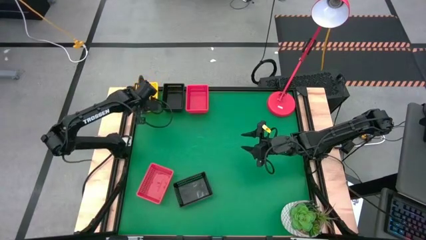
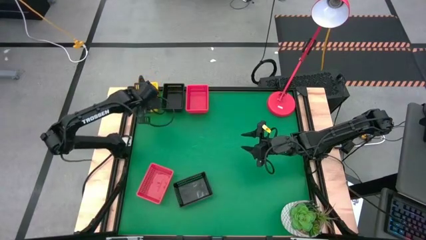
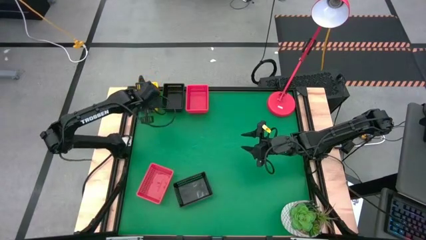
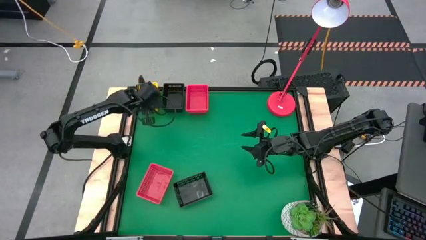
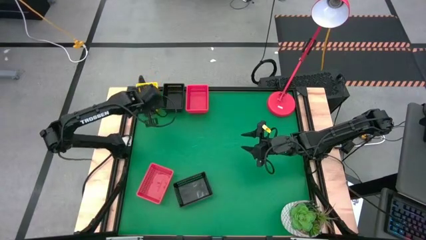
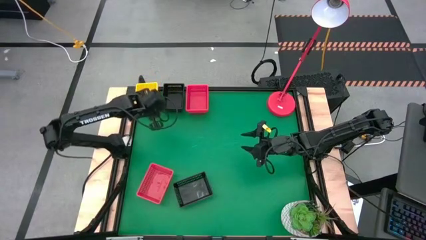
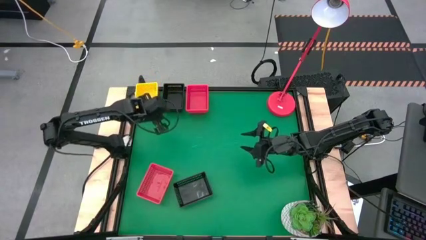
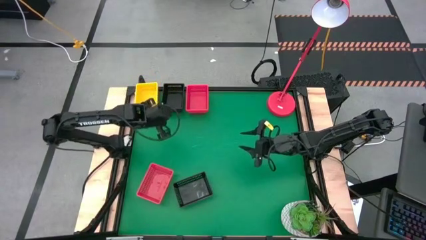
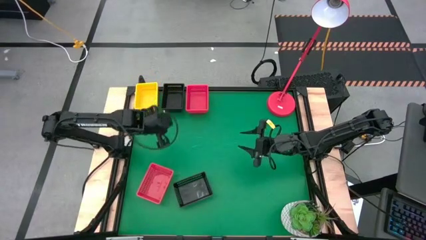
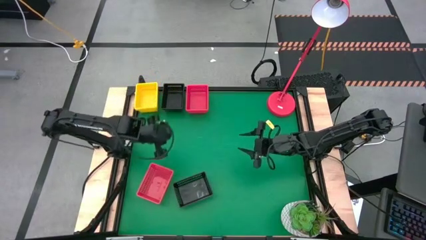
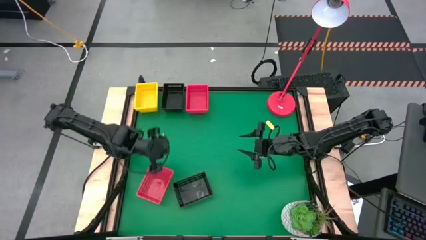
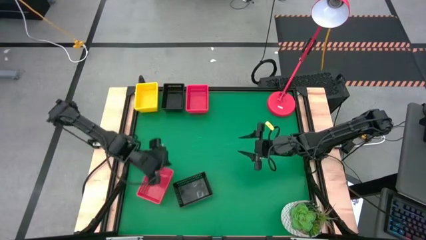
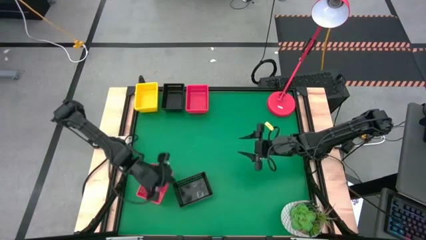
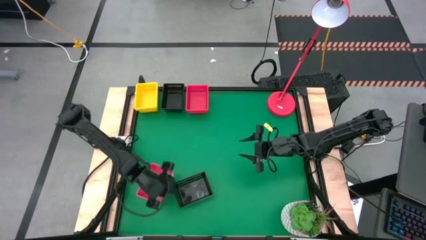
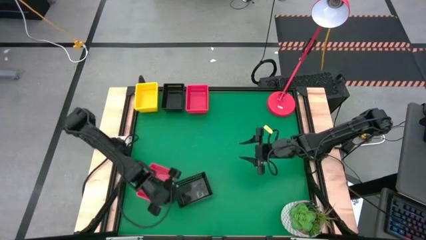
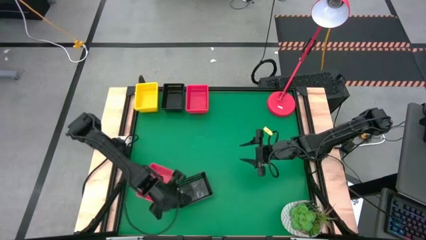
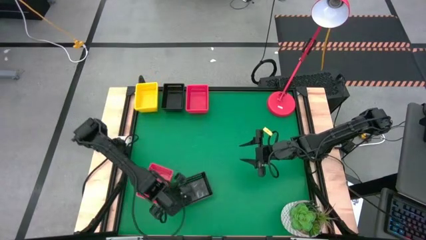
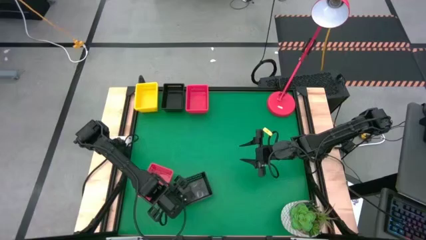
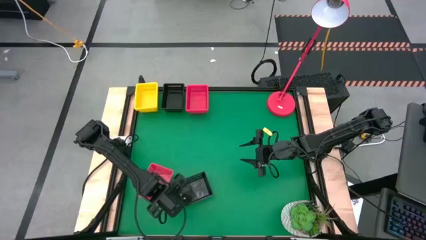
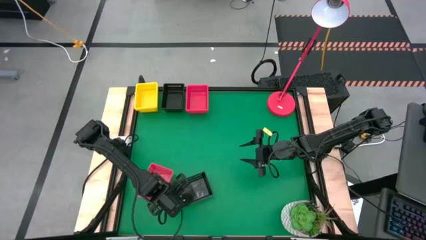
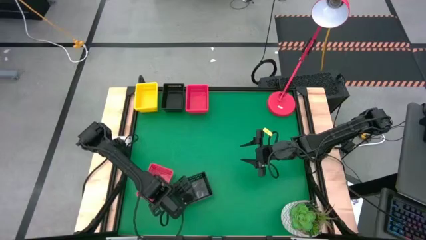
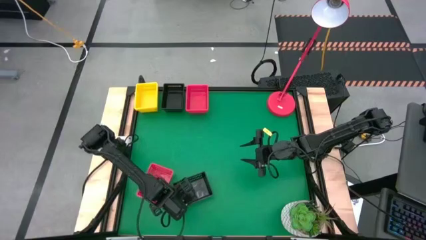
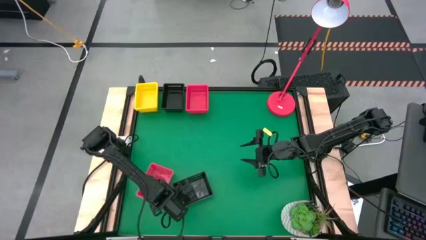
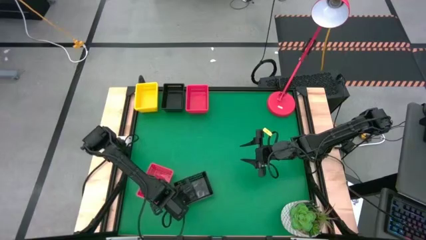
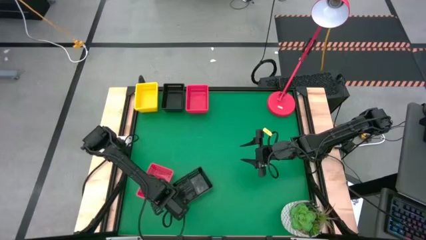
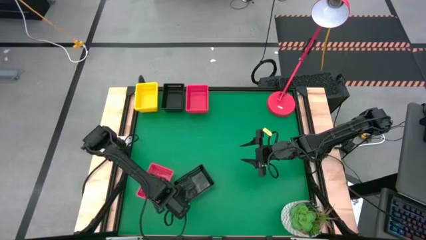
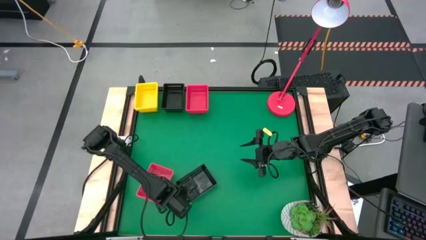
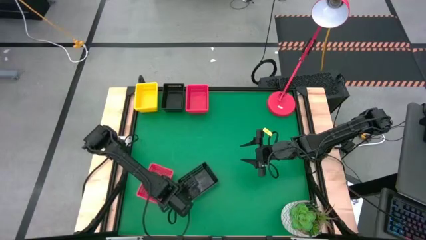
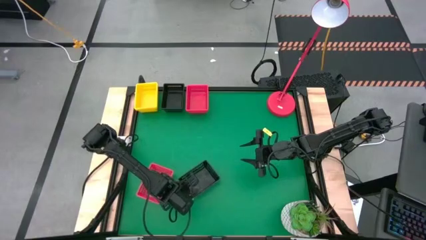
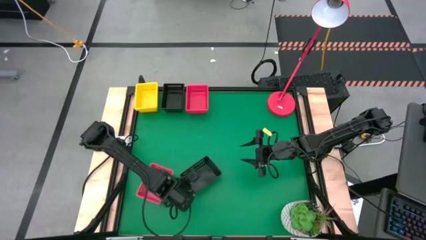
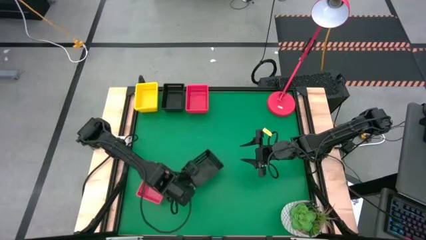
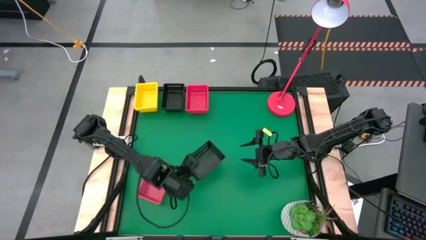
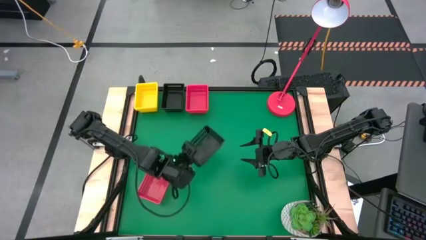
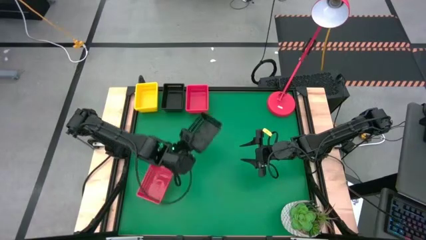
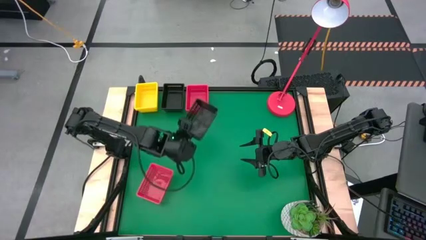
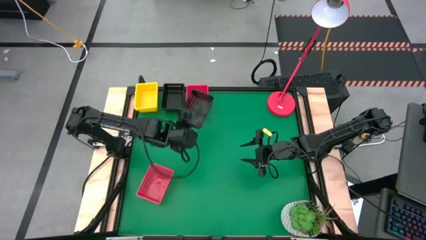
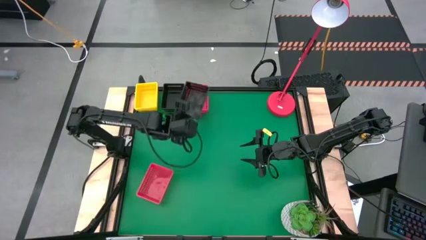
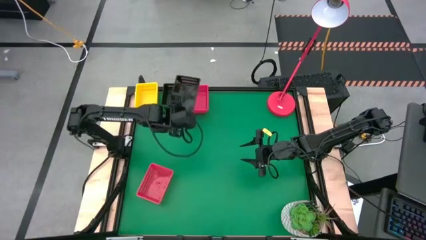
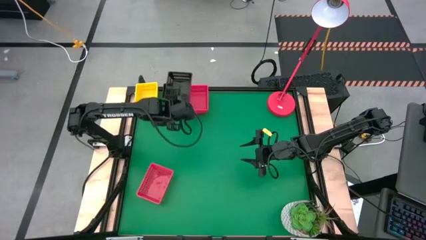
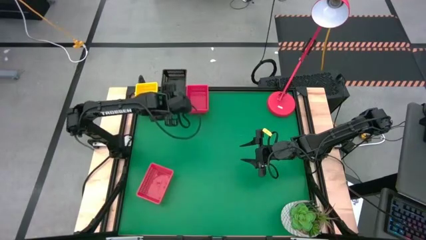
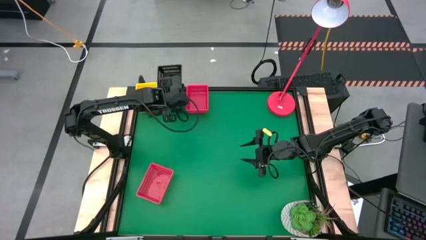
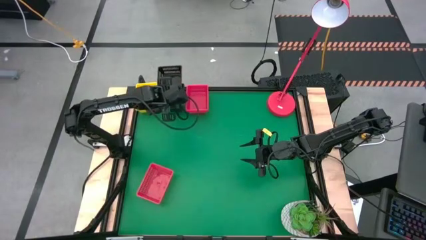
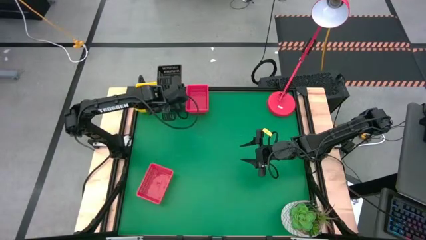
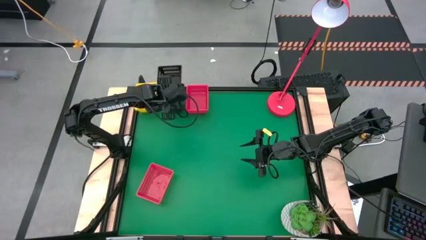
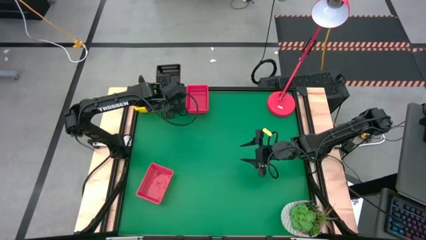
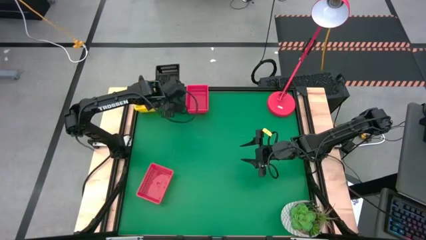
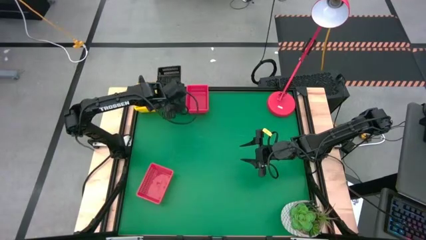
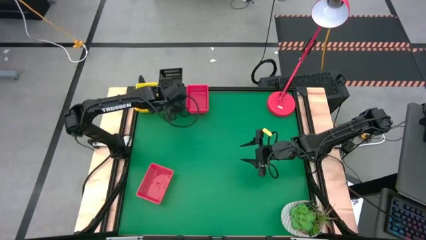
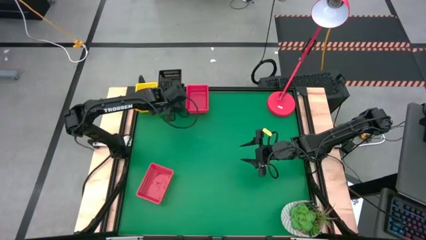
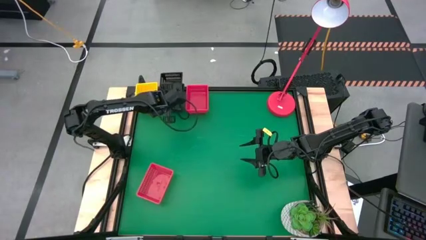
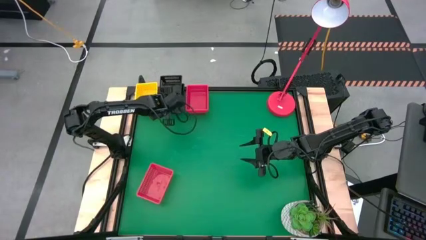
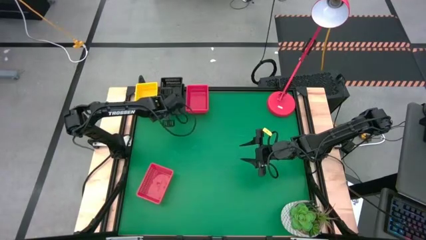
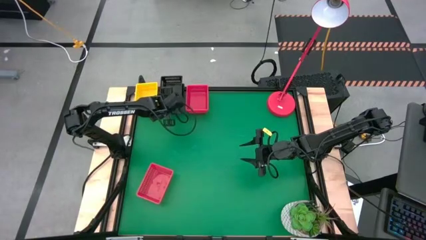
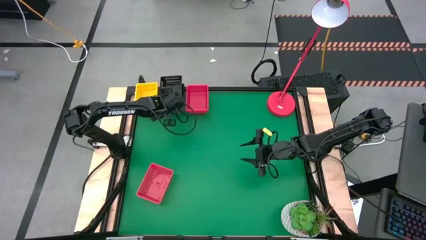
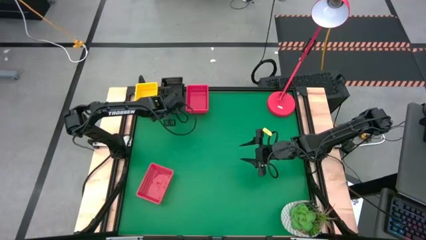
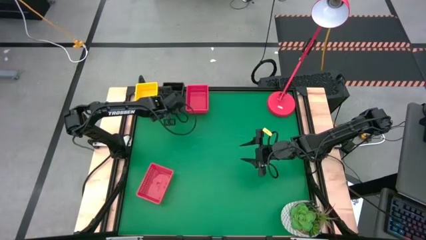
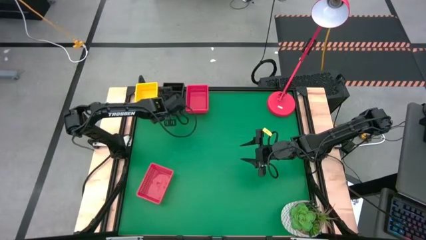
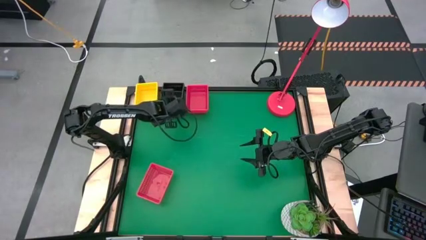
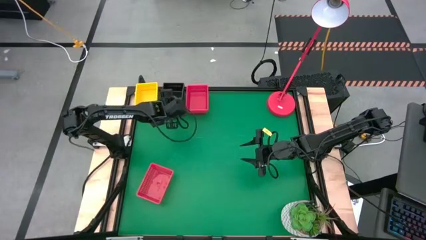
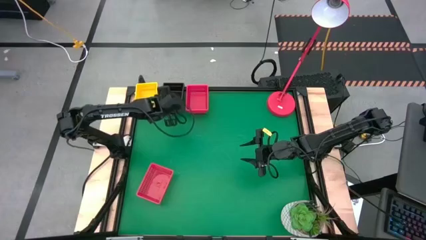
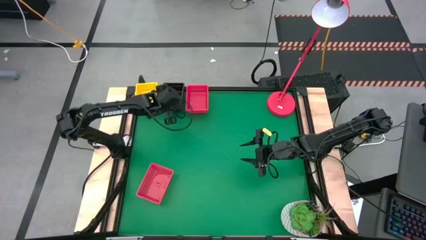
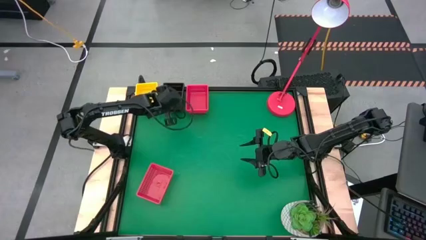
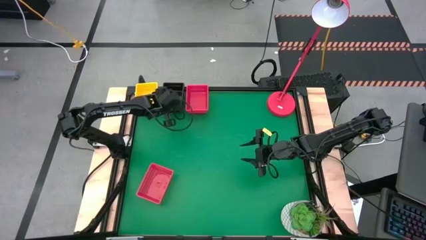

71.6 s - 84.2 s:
Stack the bottom black bin on top of the top black bin
